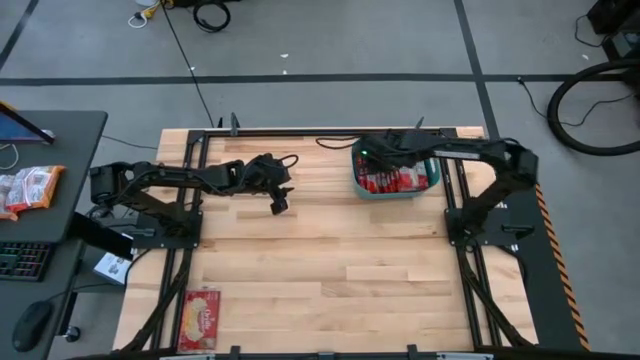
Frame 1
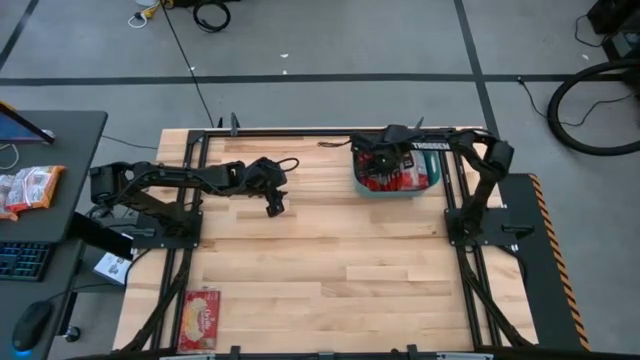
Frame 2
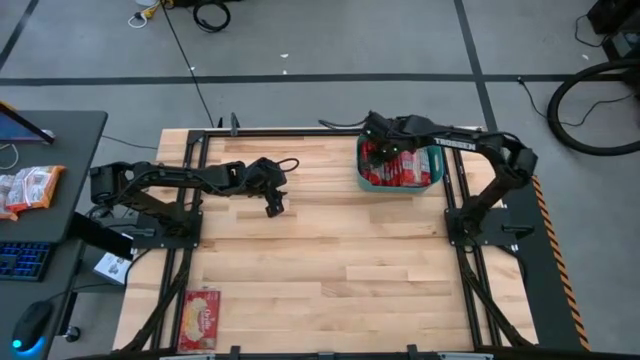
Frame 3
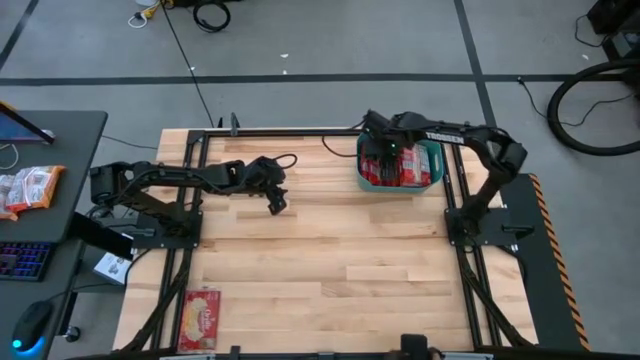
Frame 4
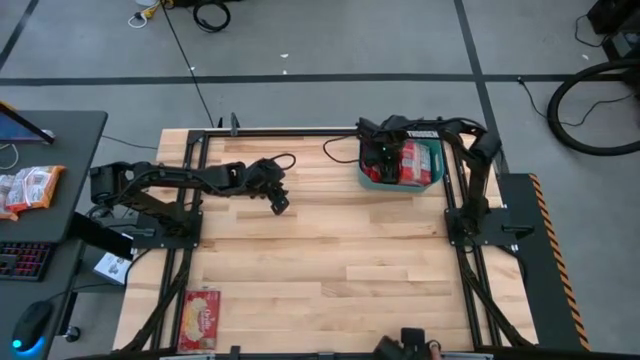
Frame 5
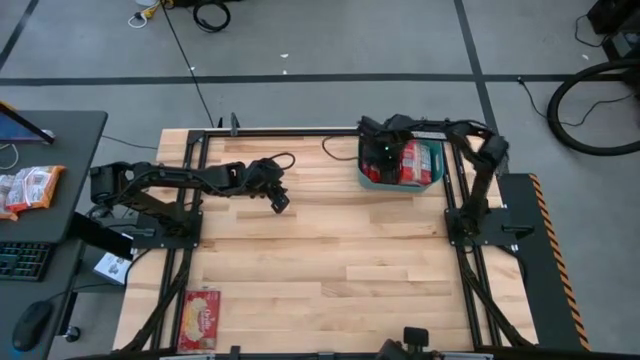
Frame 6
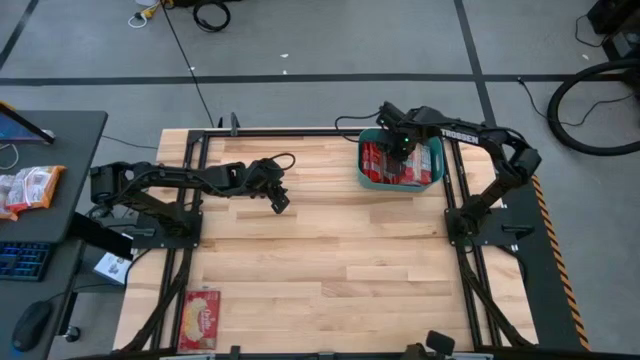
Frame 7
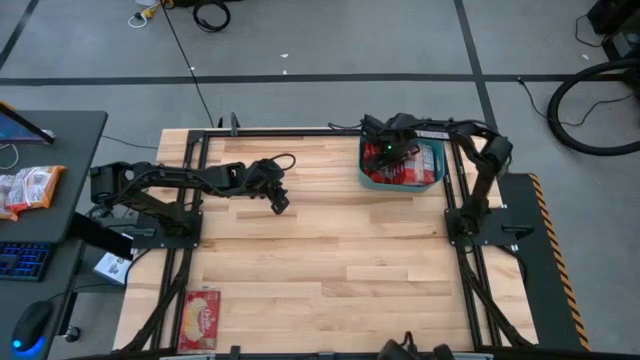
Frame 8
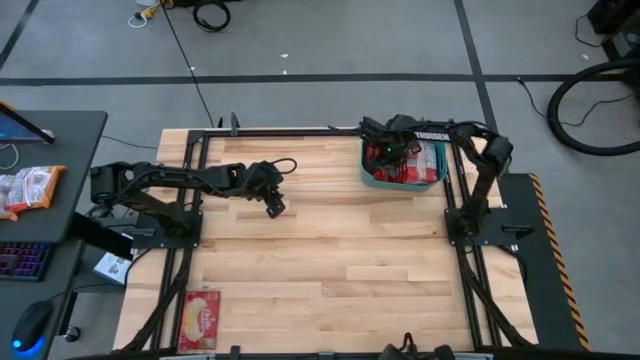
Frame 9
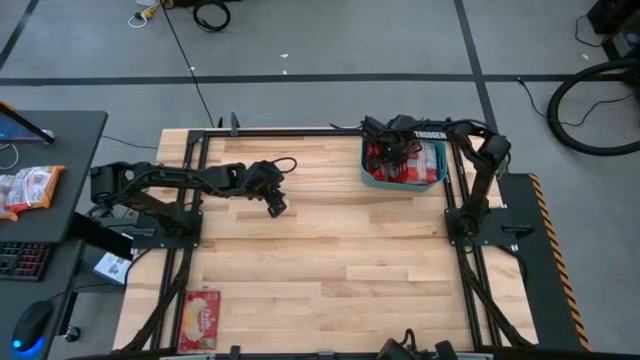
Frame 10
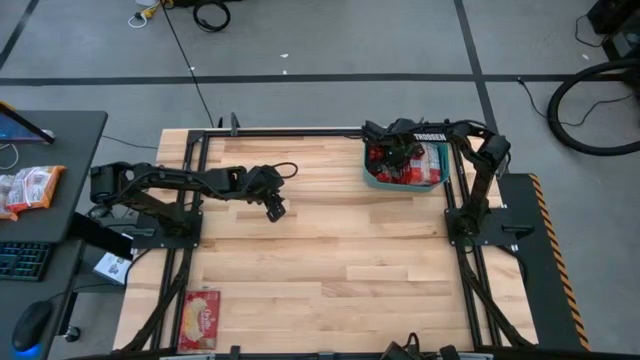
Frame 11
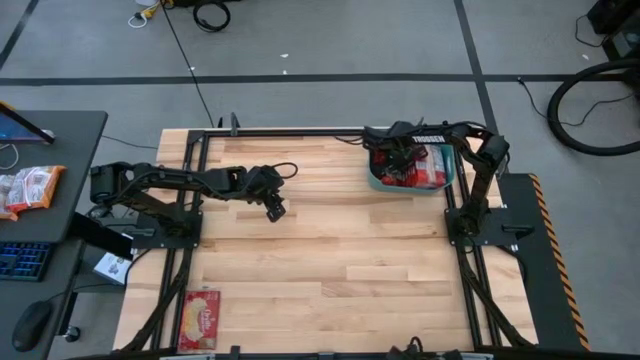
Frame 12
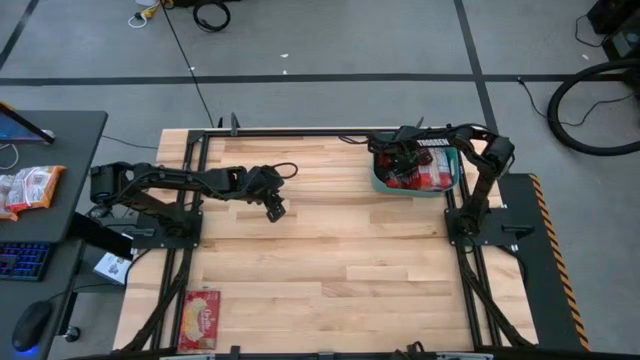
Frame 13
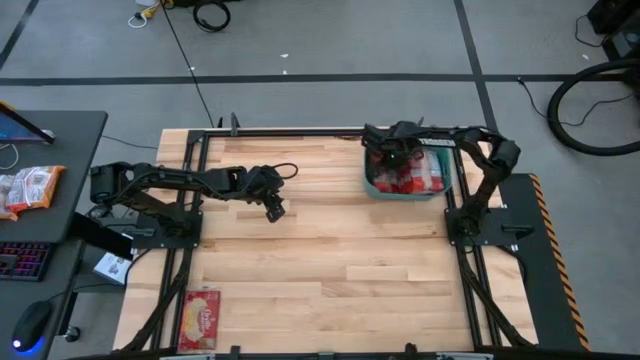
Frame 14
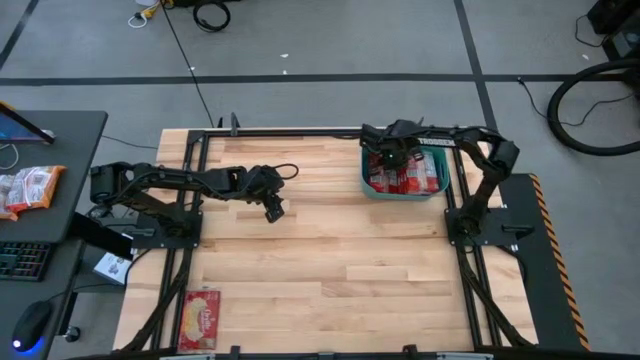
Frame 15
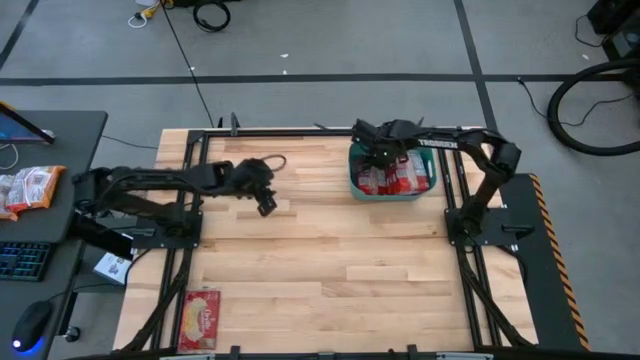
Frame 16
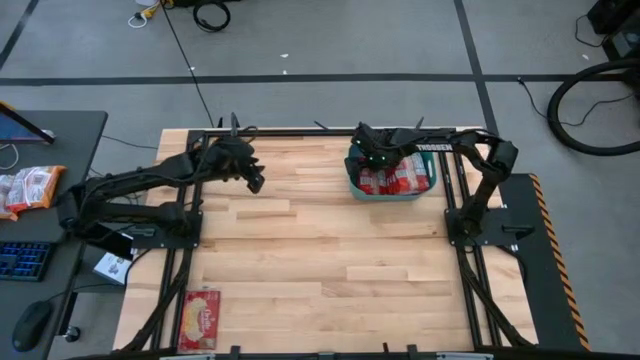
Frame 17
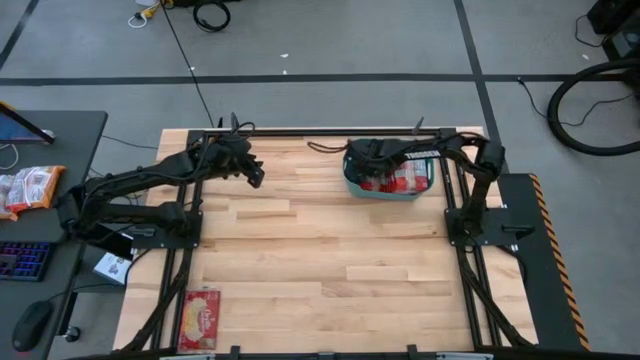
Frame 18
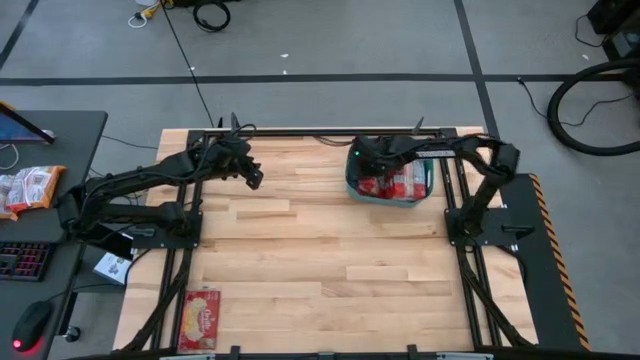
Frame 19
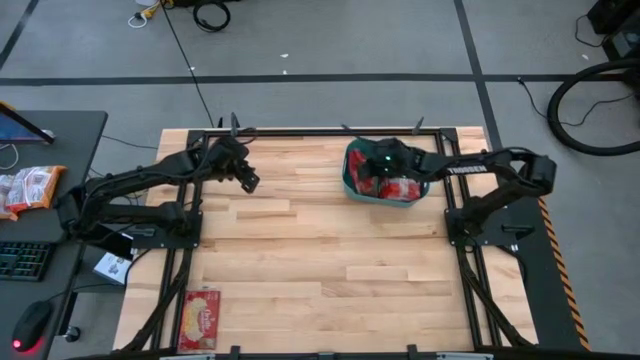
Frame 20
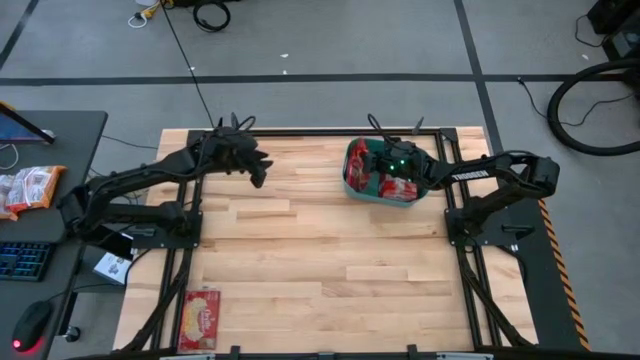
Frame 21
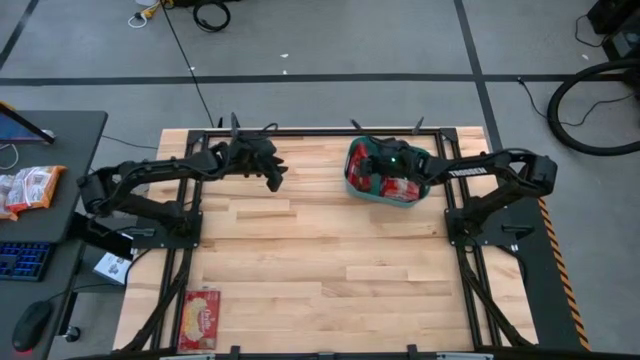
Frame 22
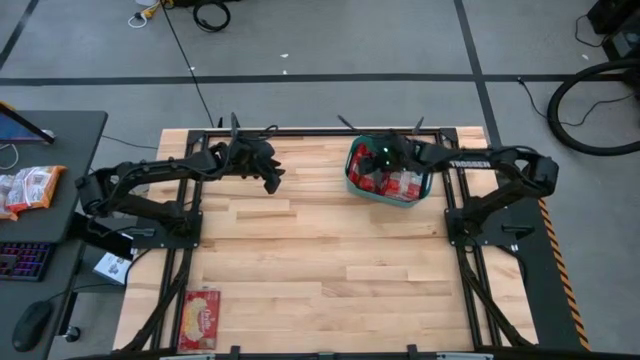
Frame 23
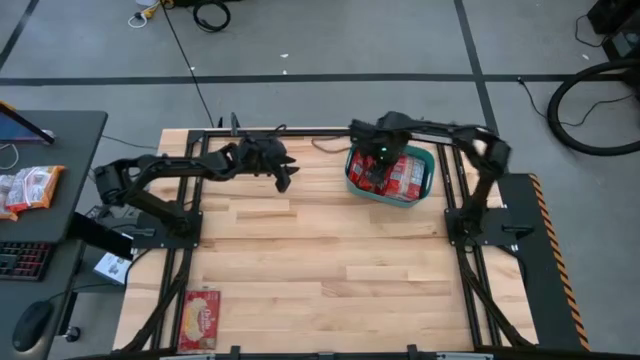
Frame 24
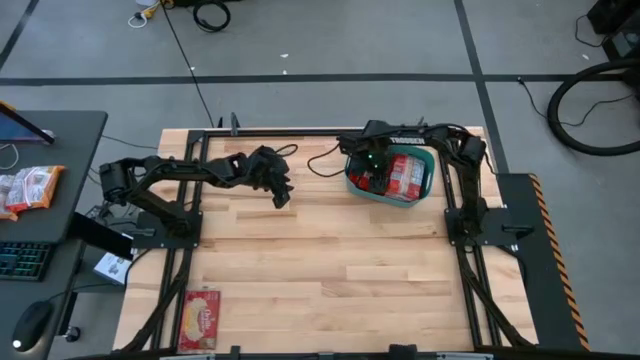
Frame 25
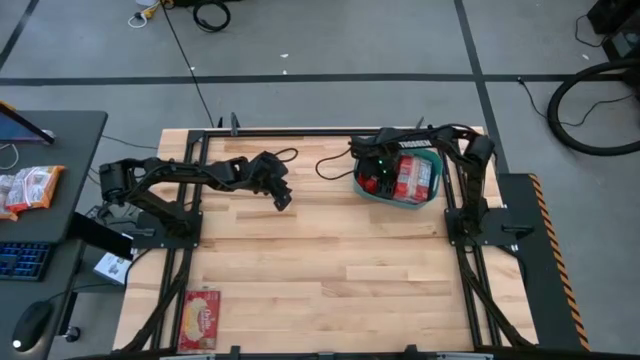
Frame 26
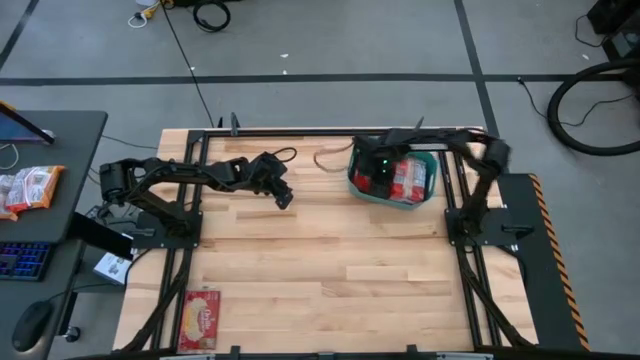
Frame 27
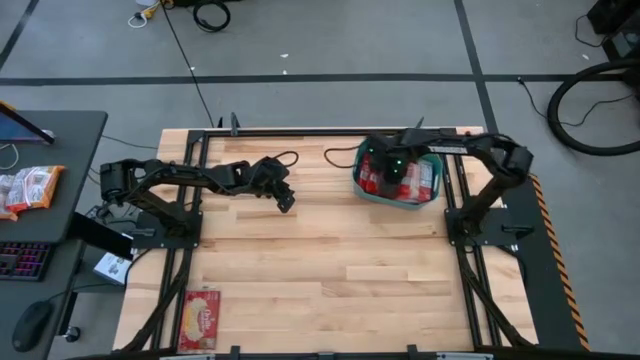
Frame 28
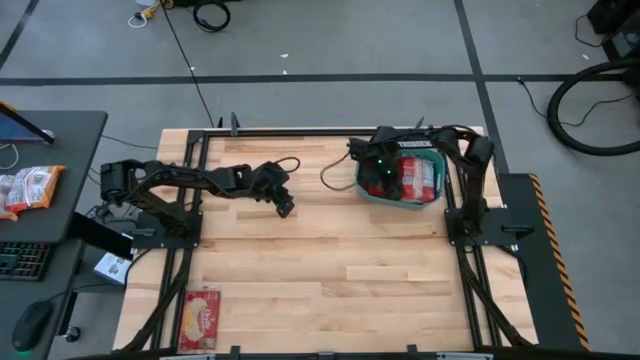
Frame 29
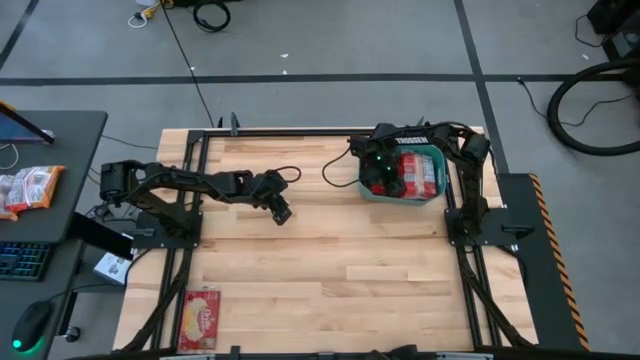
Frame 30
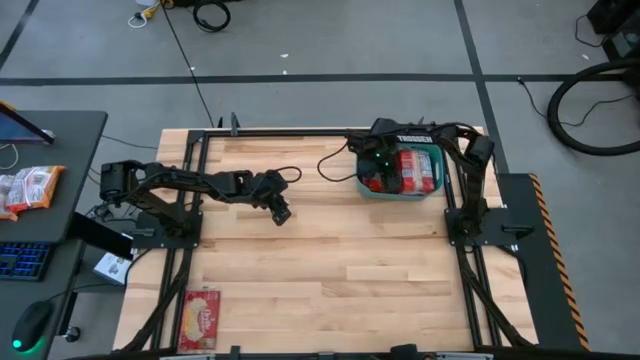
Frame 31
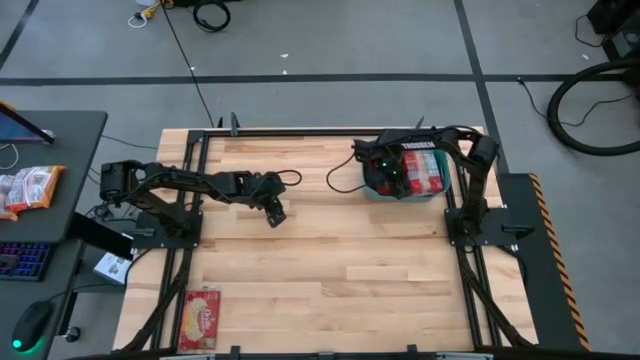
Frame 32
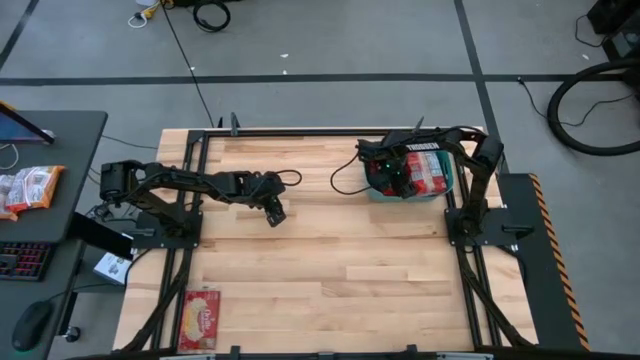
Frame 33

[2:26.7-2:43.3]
Task: Sort popcorn bags into baskets
Adjust the popcorn bags in the bin

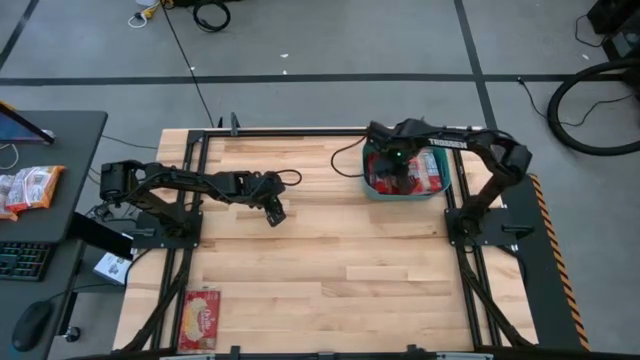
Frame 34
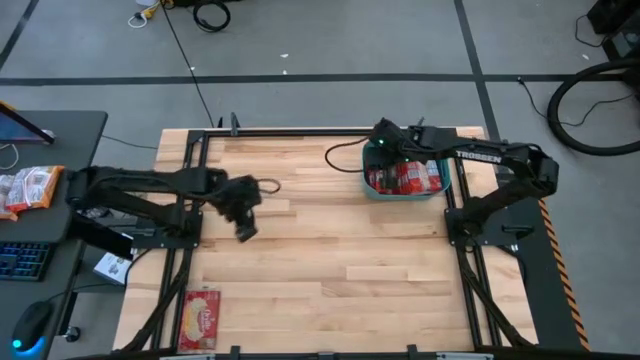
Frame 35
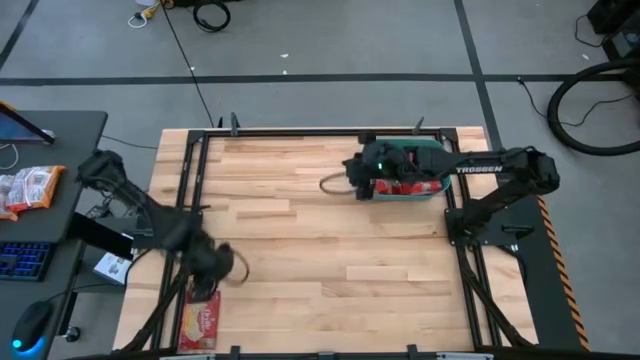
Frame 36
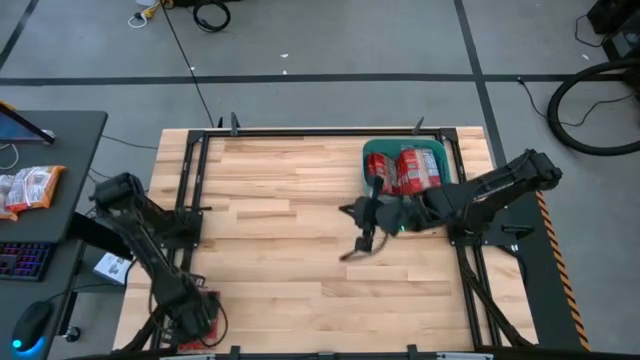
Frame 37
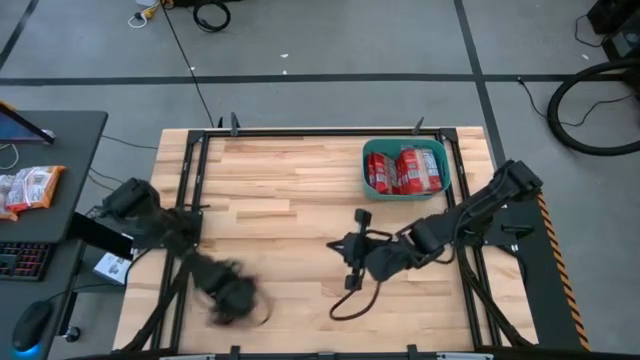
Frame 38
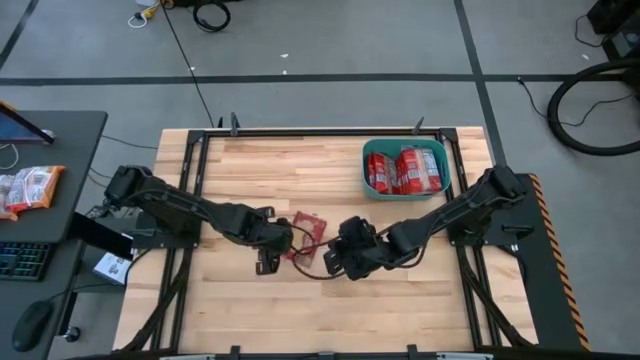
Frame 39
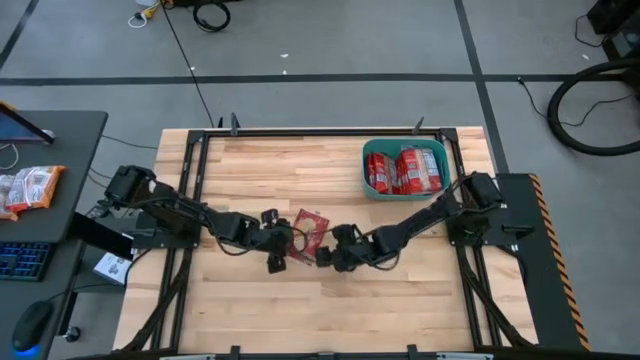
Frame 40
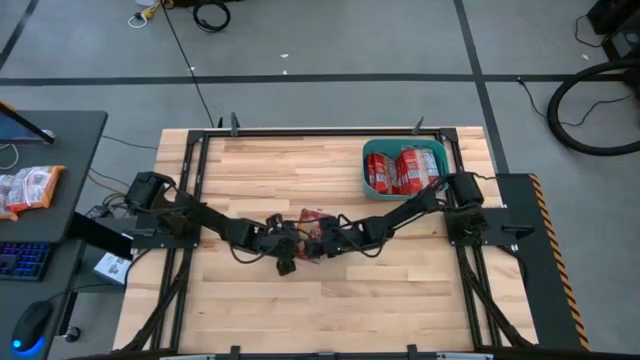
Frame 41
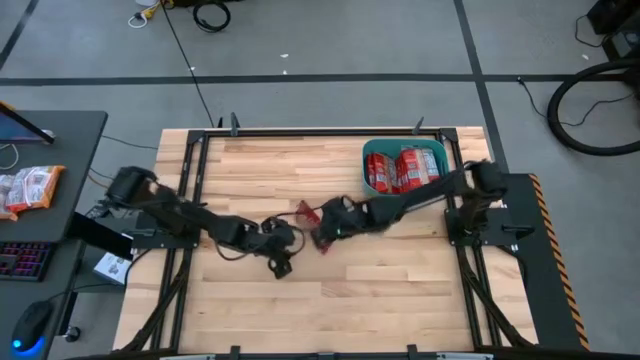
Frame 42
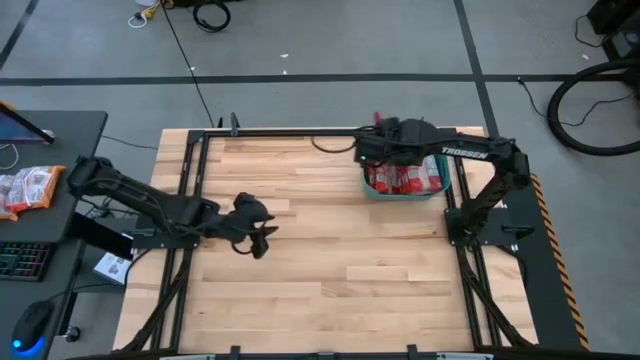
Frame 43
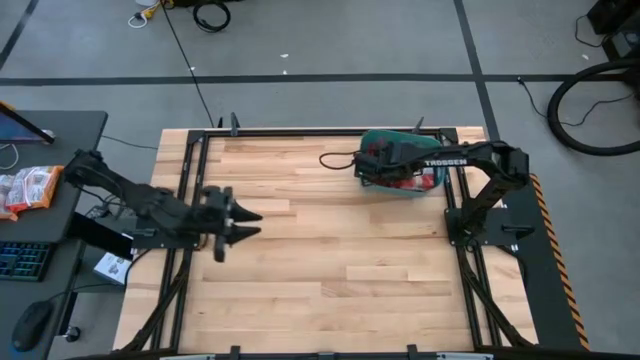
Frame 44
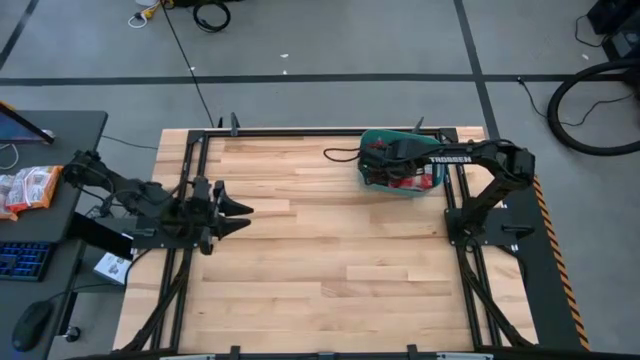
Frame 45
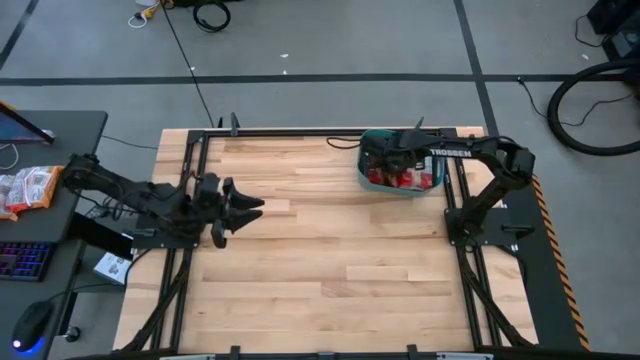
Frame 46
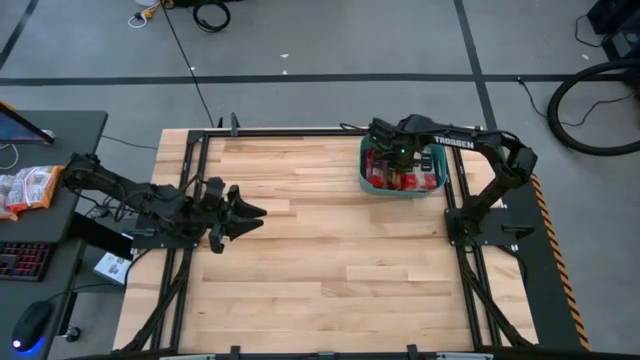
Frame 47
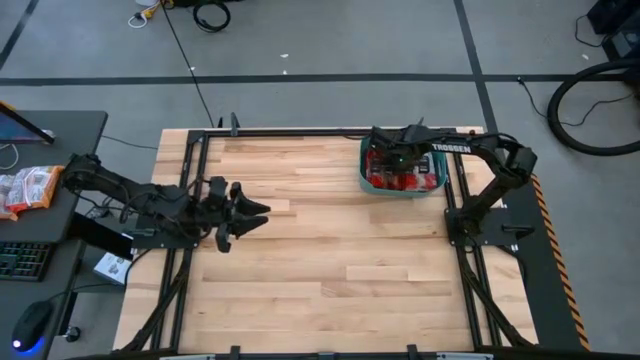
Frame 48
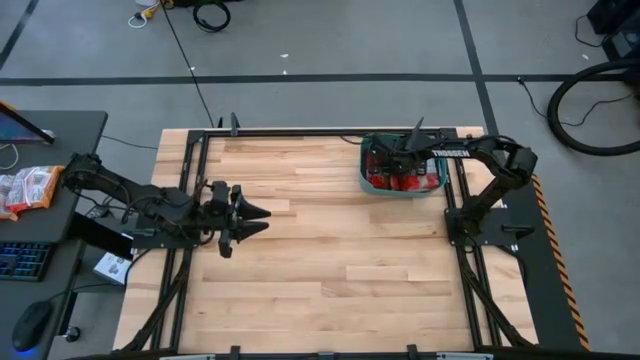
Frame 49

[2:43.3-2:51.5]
Put the popcorn bag into the bin
